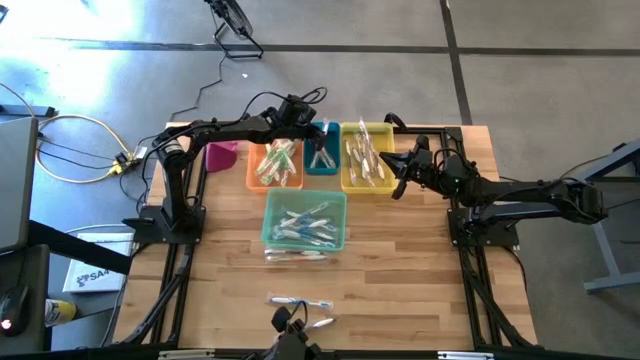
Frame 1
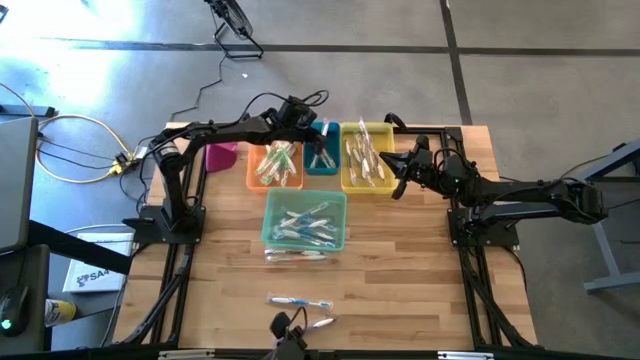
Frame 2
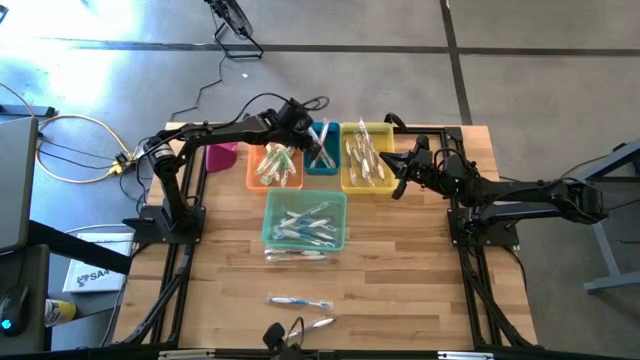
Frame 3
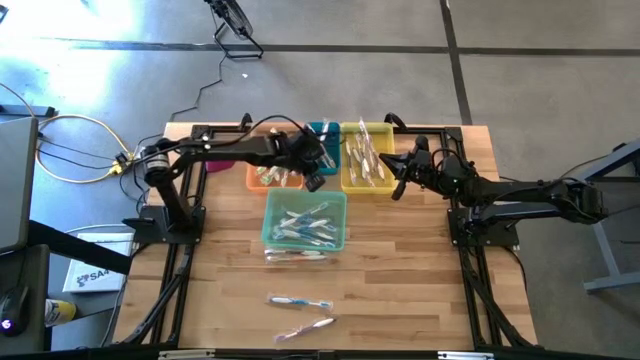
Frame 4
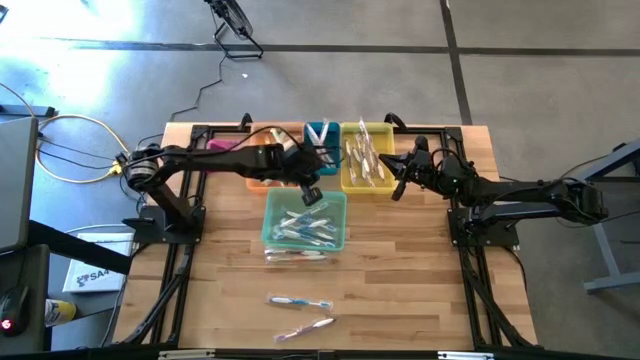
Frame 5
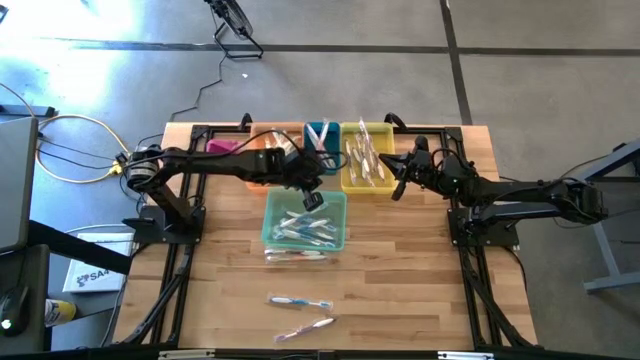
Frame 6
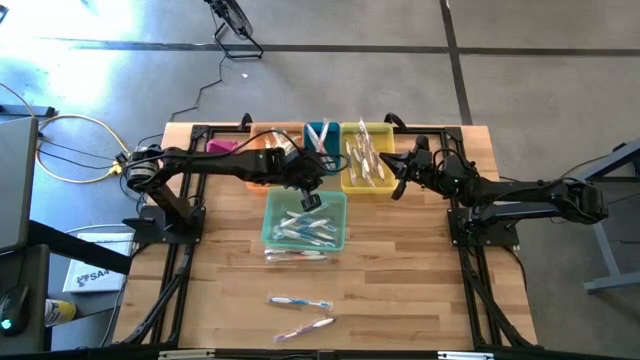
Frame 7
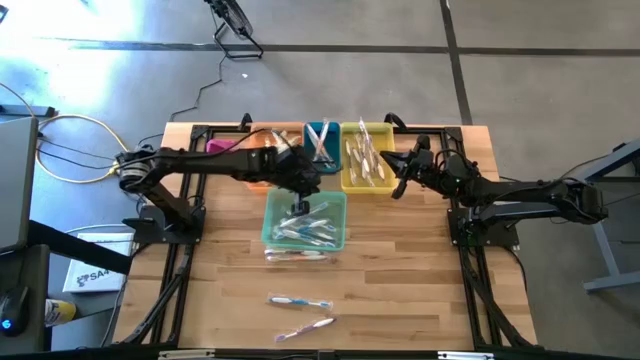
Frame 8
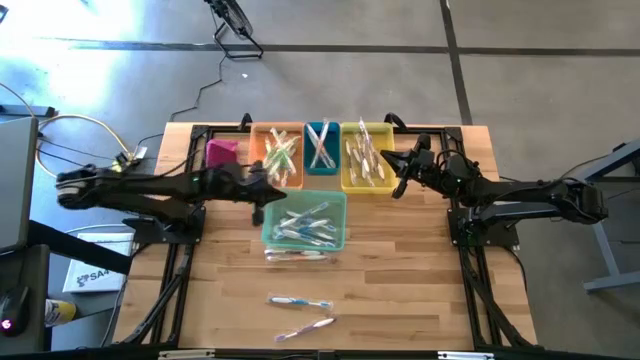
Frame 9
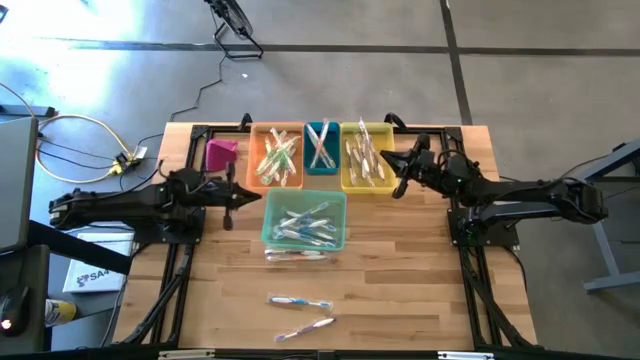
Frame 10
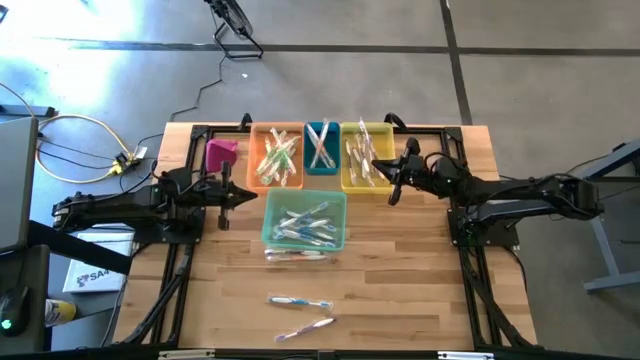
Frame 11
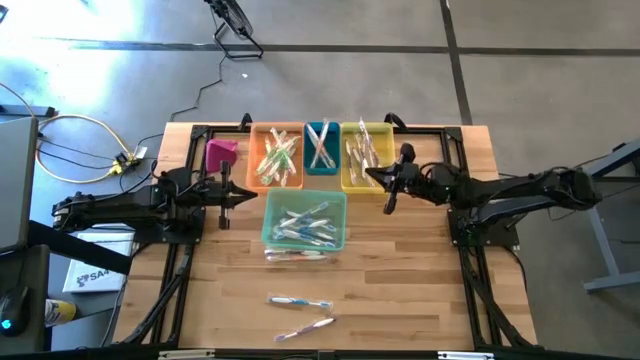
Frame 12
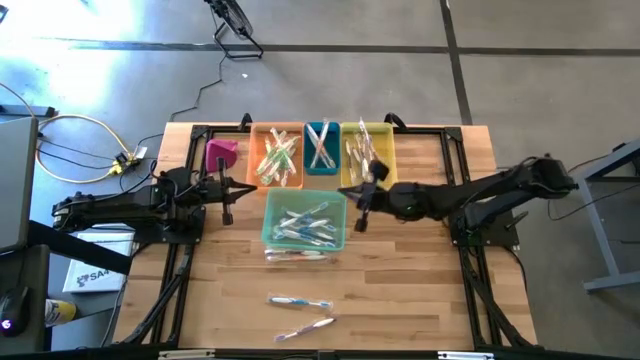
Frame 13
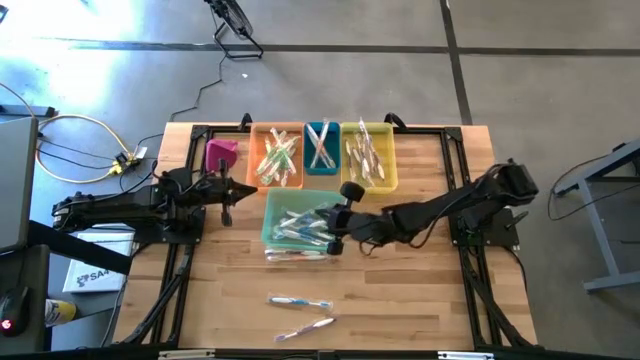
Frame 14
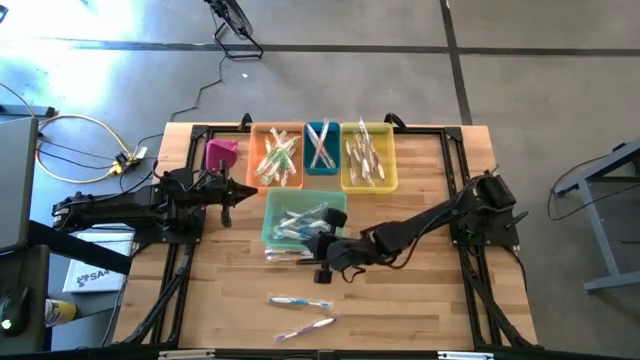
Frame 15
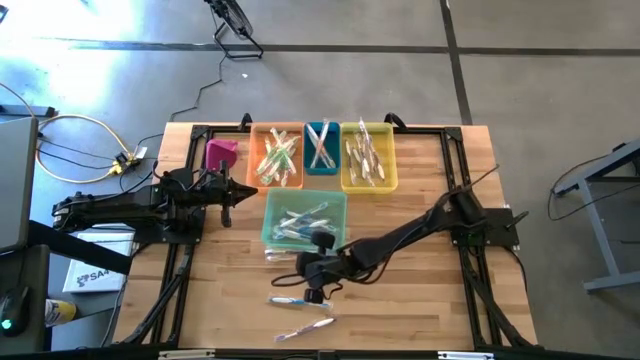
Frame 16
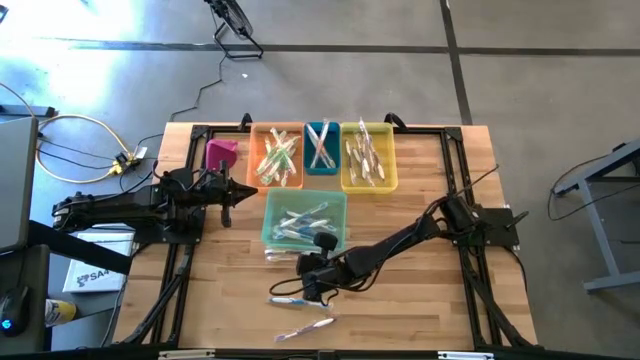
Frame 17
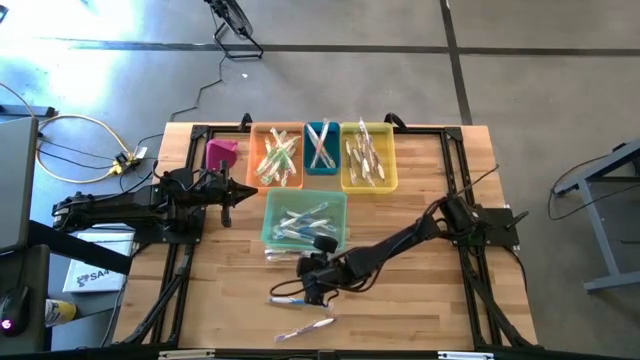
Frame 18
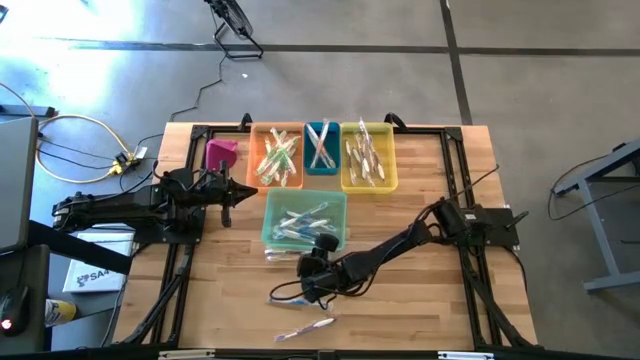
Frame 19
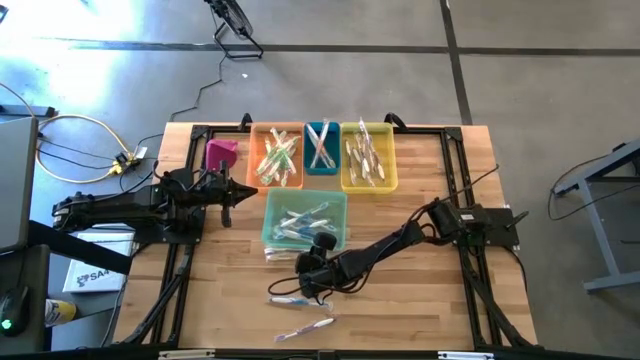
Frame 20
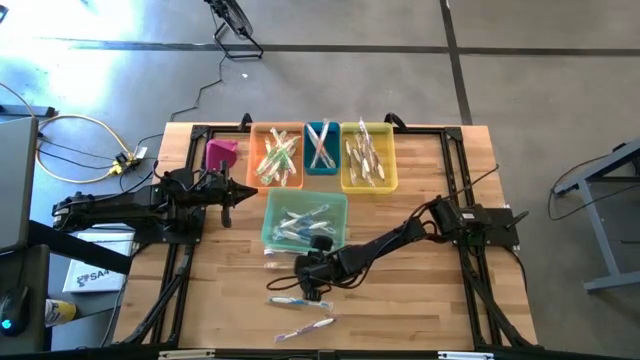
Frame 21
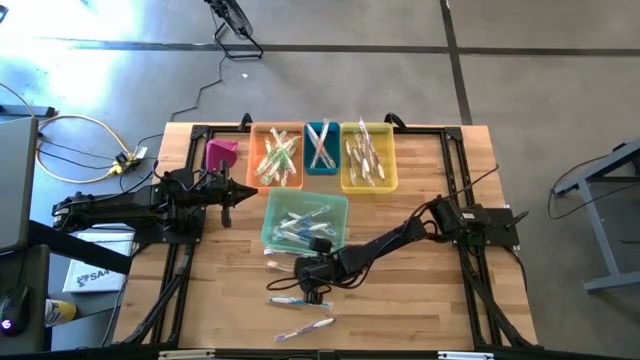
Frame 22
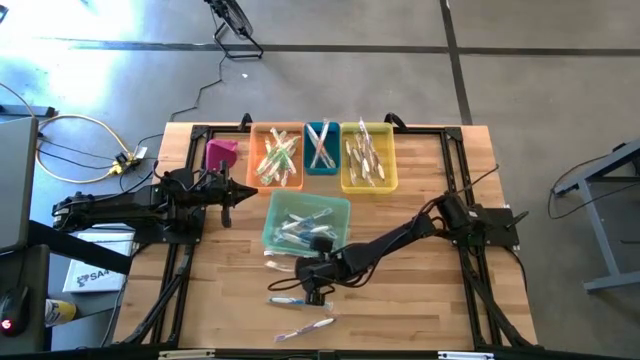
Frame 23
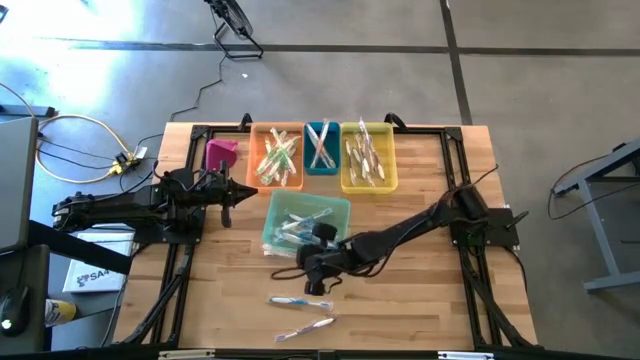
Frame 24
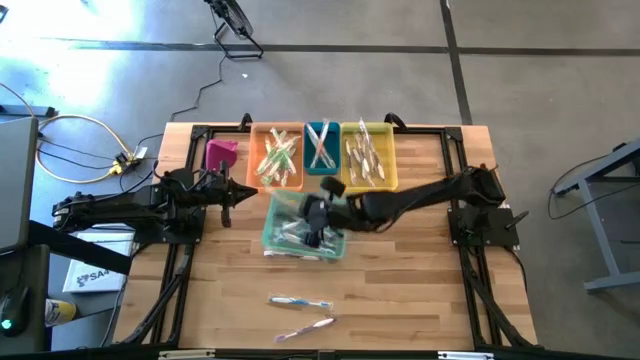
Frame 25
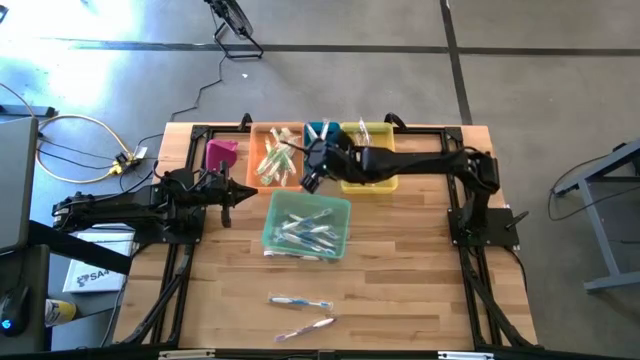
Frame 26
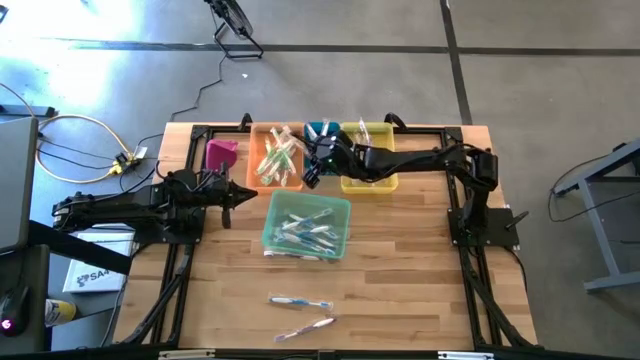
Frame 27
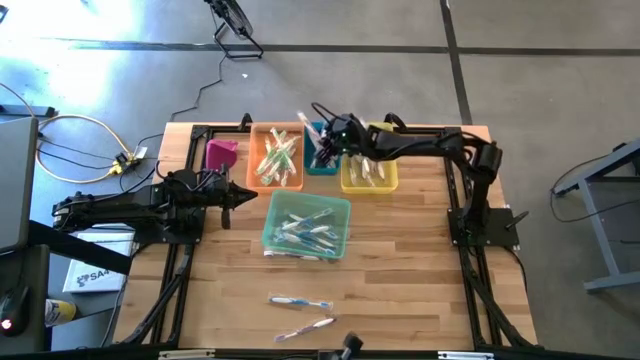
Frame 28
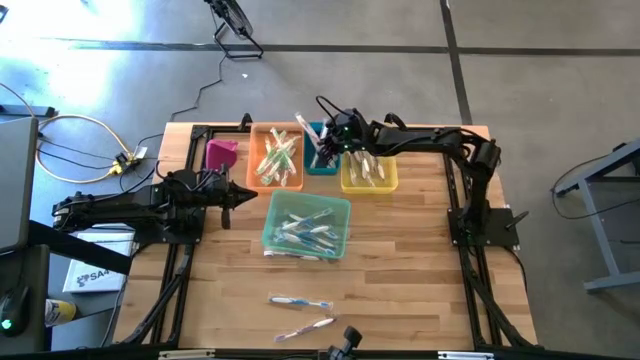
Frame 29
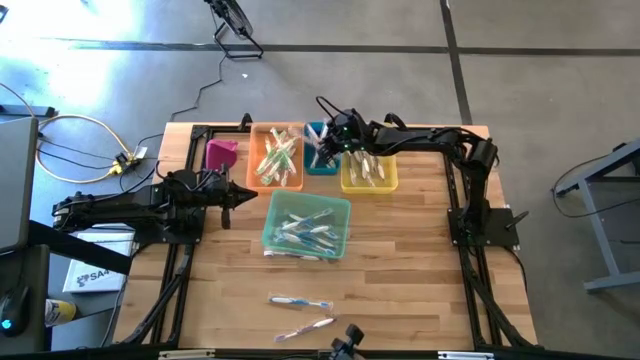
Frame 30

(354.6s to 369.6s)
Task: Pick & Place Toothbrushes
Put the orange toothbrush into the blue bin

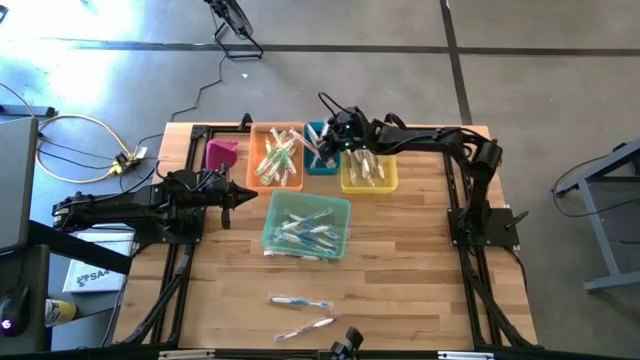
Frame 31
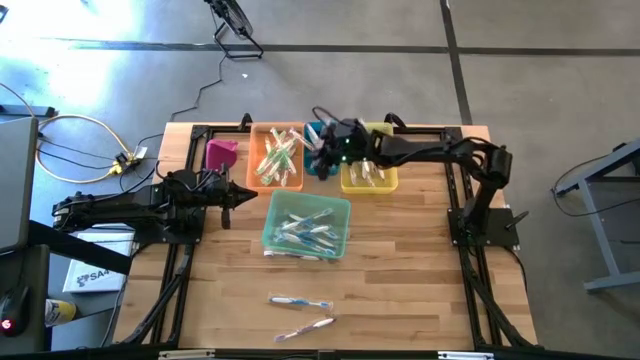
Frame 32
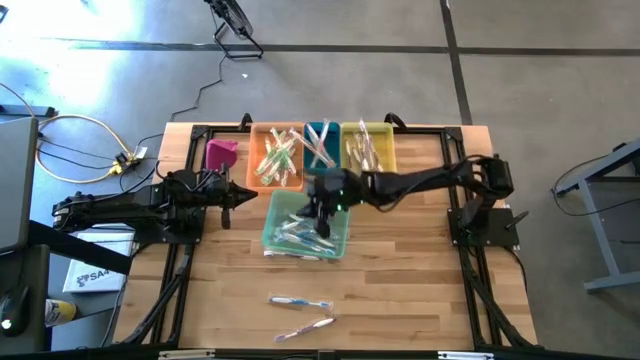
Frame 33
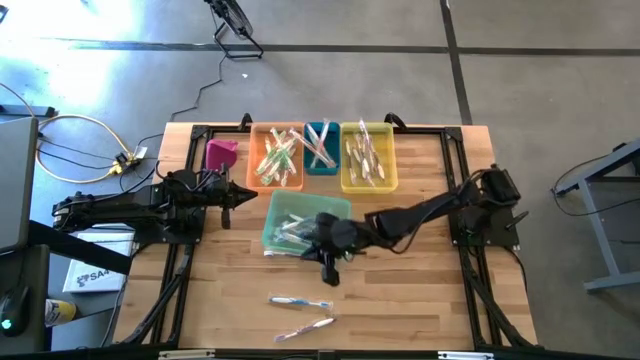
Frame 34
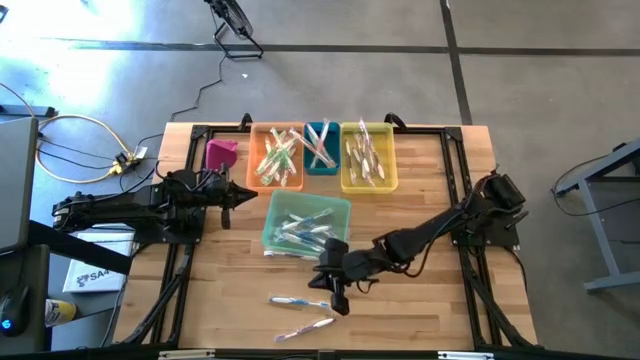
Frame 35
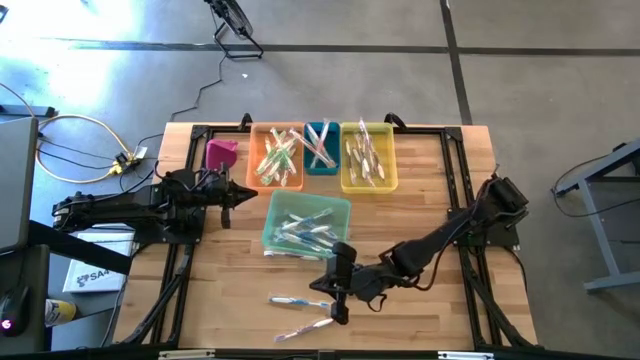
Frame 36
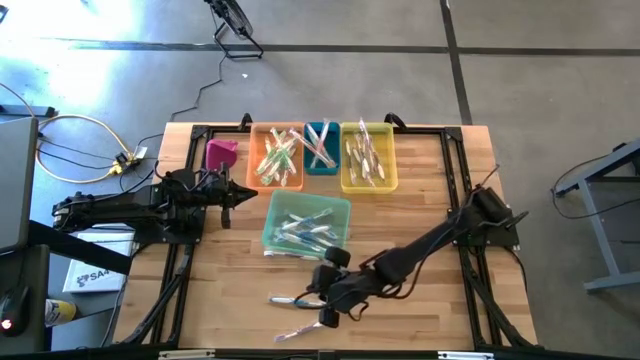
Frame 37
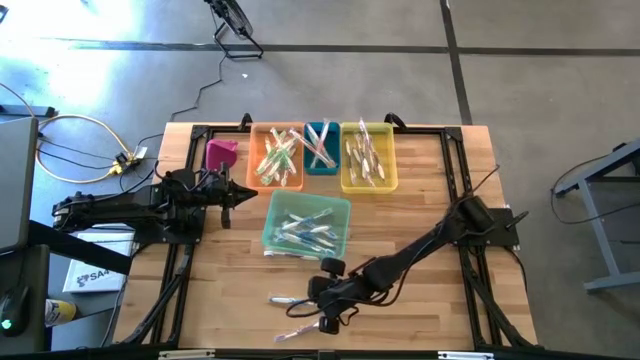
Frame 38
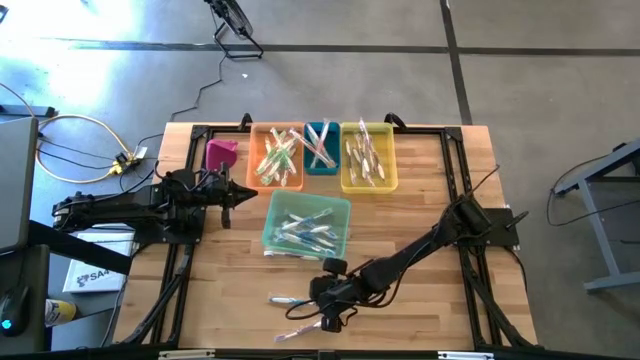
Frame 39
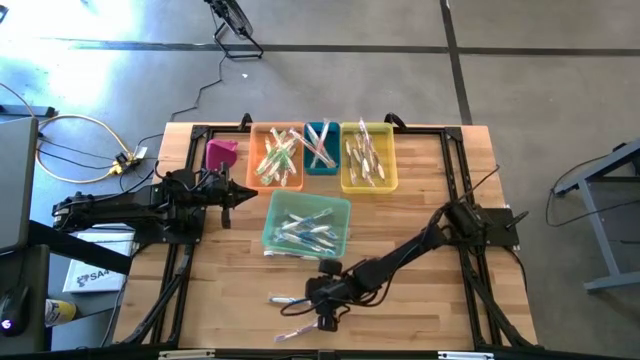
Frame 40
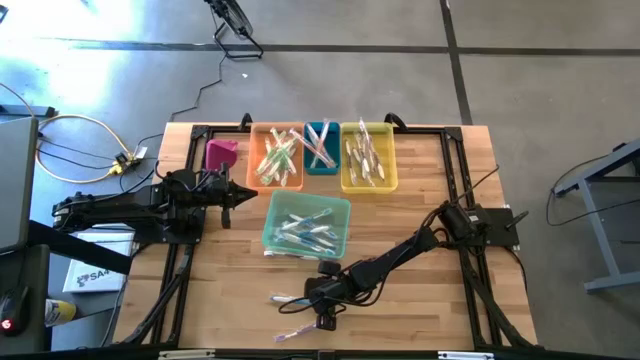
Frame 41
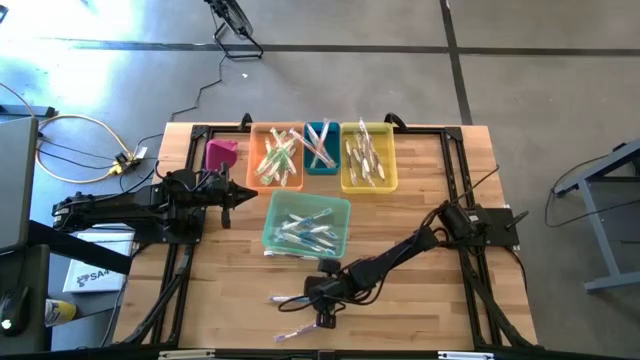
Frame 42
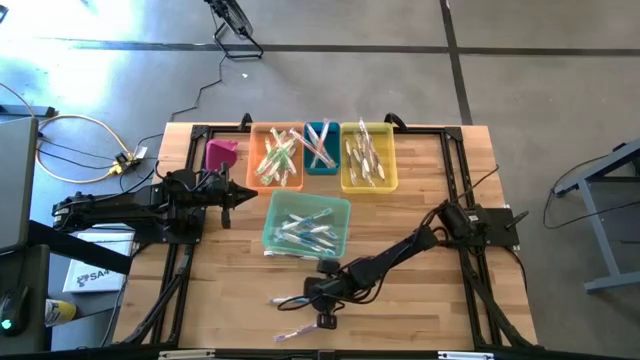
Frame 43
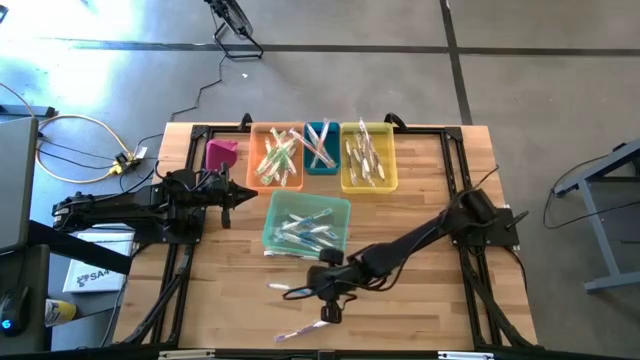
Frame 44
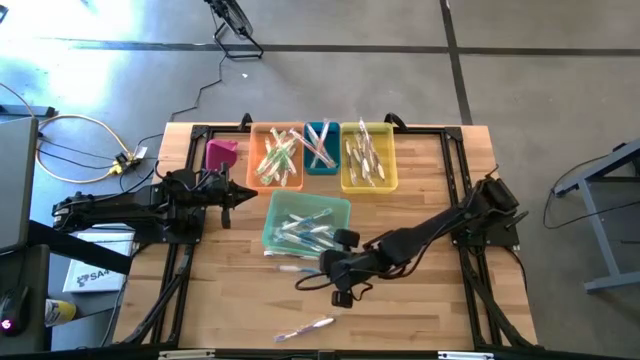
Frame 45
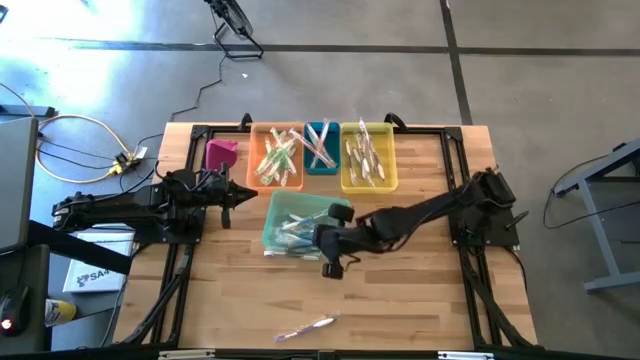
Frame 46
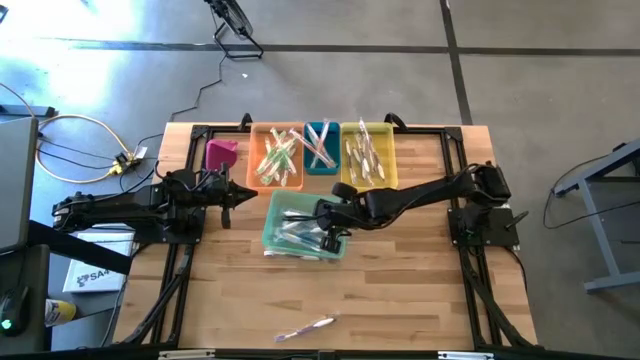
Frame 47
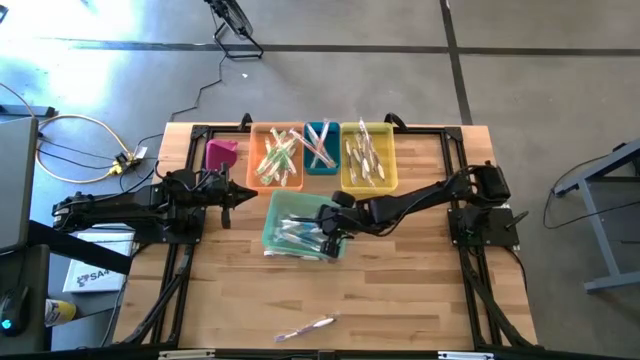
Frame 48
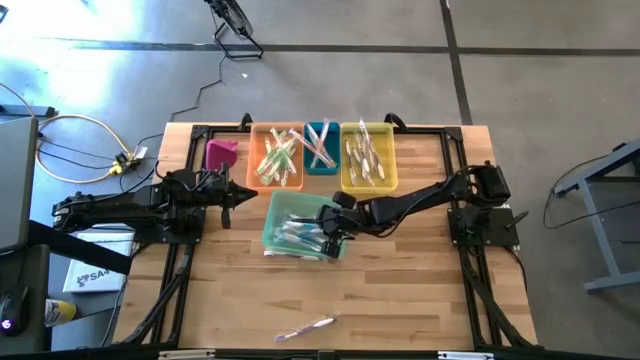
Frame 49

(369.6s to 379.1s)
Put the blue toothbrush into the green bin
